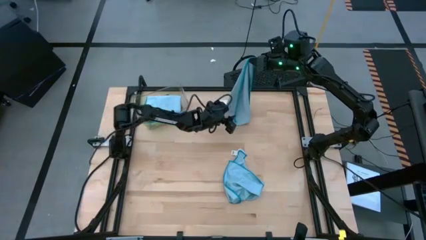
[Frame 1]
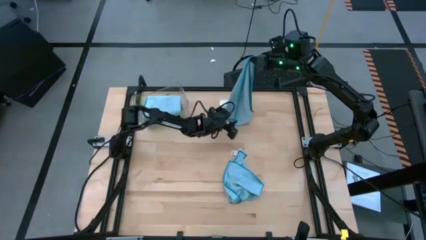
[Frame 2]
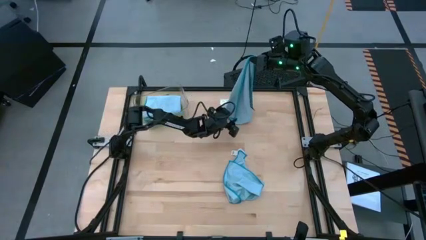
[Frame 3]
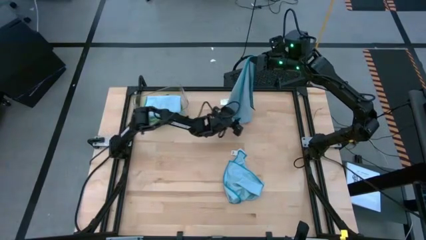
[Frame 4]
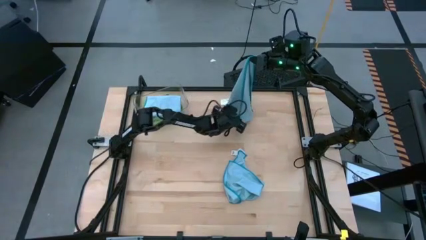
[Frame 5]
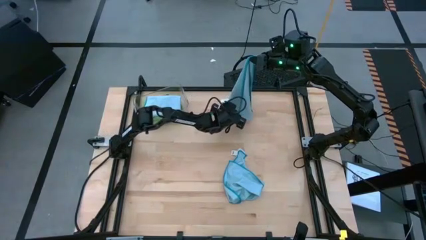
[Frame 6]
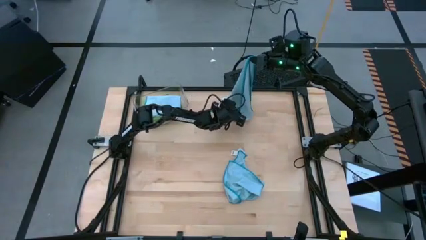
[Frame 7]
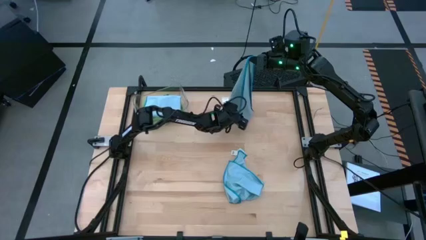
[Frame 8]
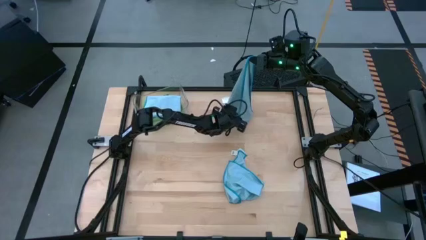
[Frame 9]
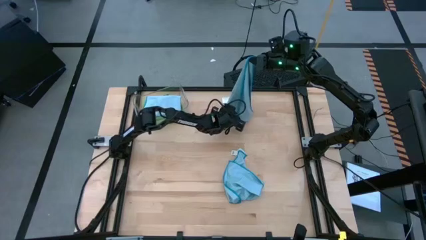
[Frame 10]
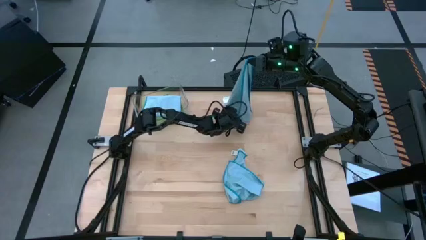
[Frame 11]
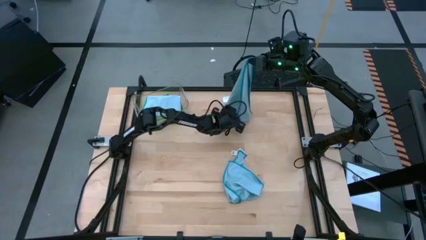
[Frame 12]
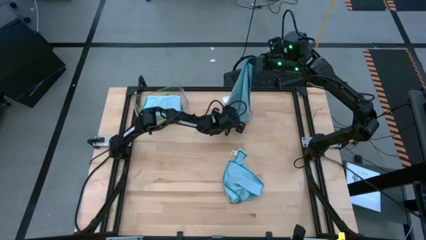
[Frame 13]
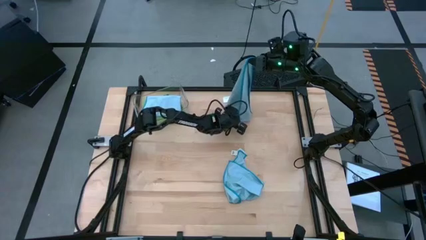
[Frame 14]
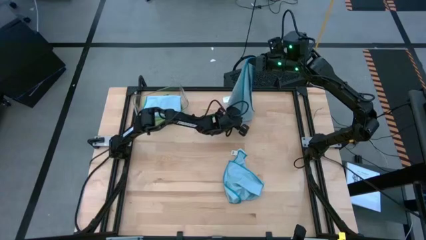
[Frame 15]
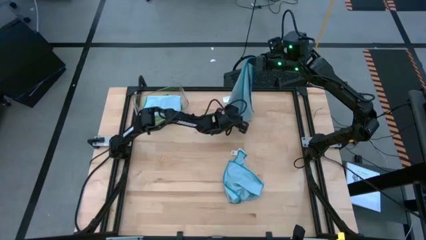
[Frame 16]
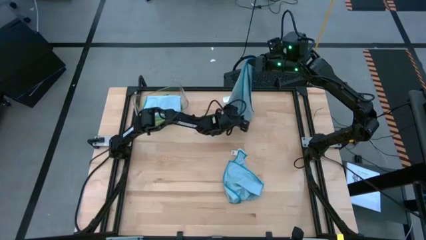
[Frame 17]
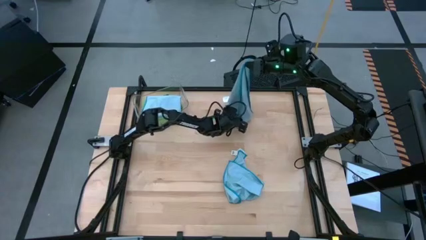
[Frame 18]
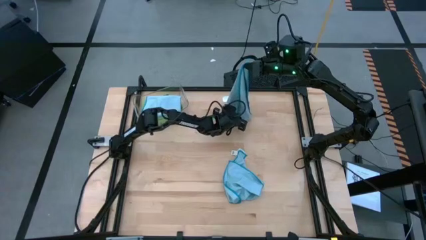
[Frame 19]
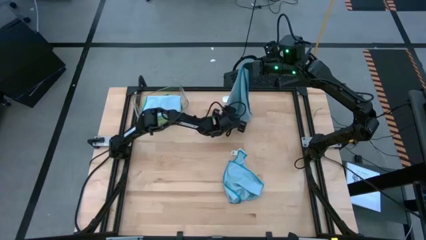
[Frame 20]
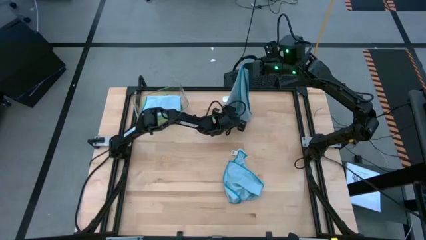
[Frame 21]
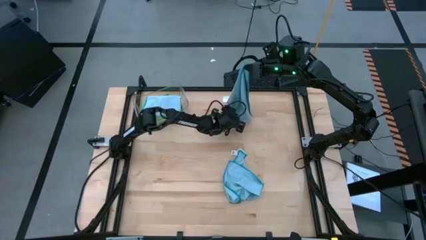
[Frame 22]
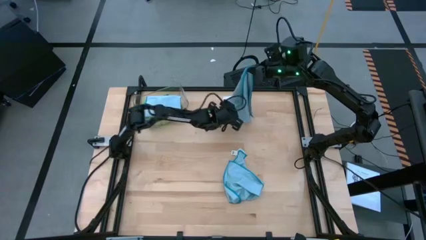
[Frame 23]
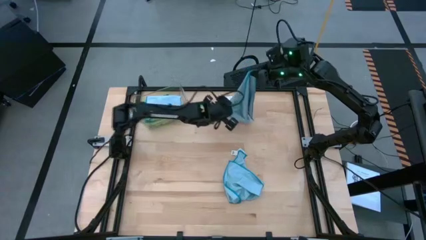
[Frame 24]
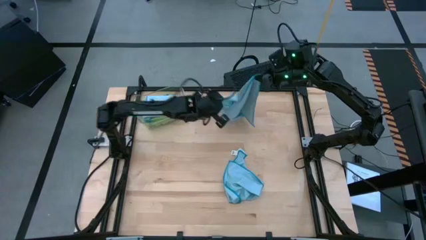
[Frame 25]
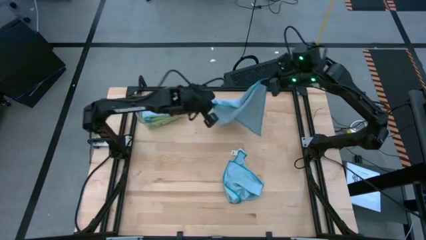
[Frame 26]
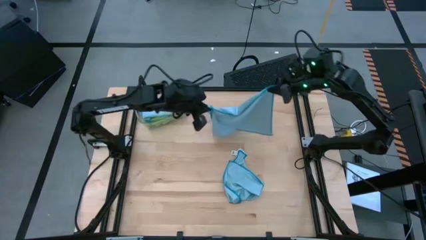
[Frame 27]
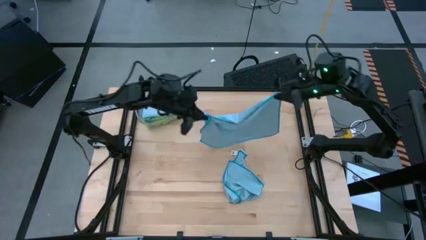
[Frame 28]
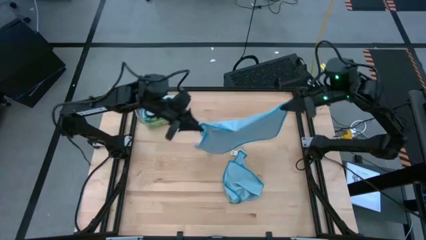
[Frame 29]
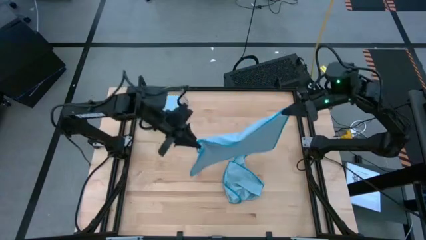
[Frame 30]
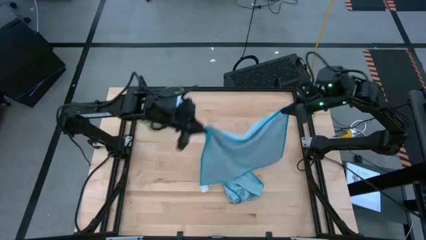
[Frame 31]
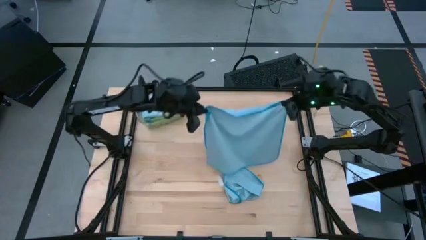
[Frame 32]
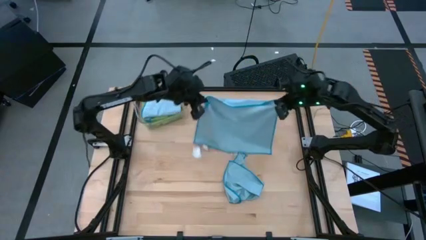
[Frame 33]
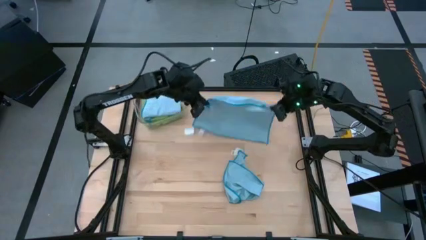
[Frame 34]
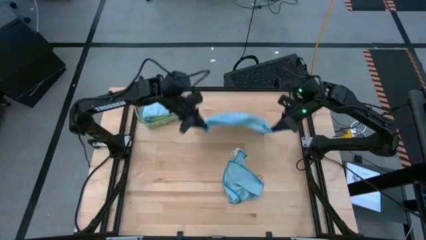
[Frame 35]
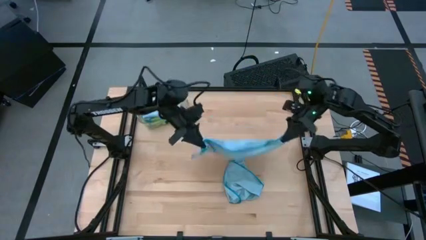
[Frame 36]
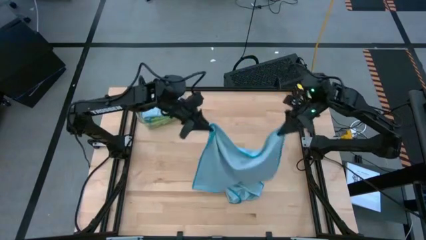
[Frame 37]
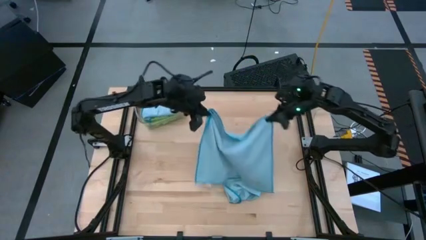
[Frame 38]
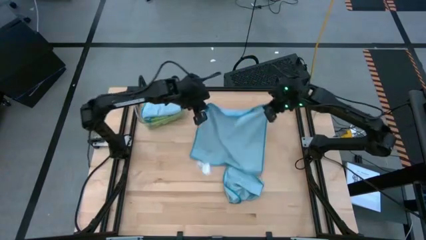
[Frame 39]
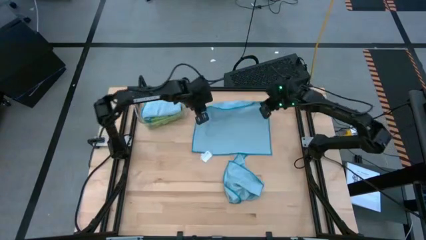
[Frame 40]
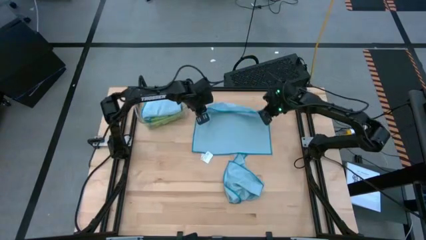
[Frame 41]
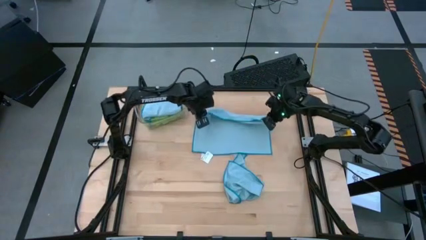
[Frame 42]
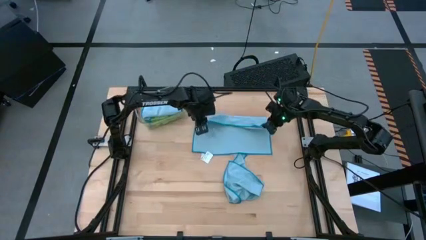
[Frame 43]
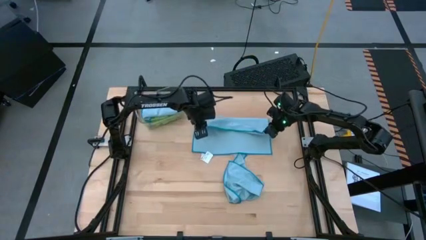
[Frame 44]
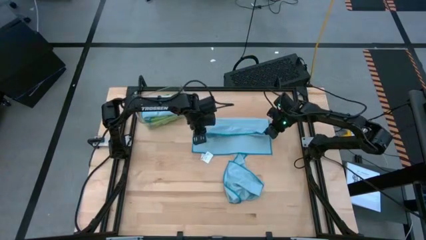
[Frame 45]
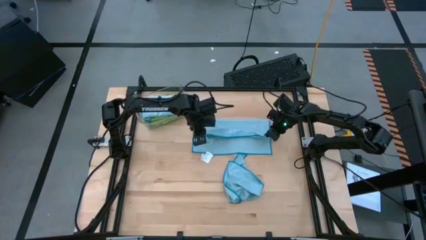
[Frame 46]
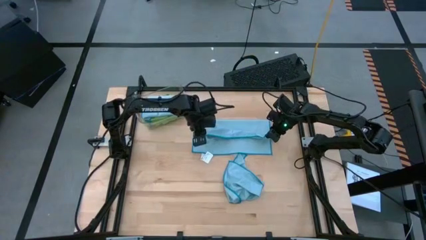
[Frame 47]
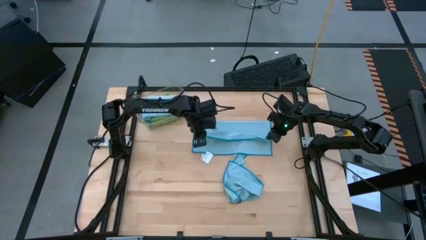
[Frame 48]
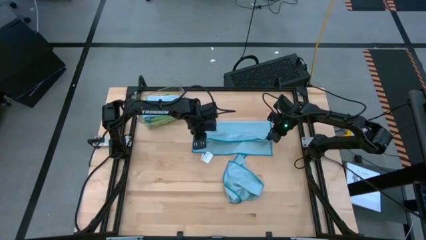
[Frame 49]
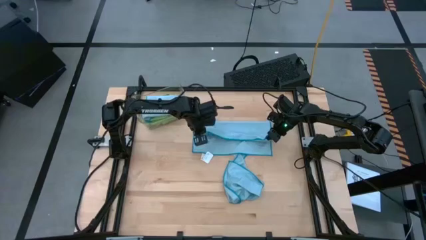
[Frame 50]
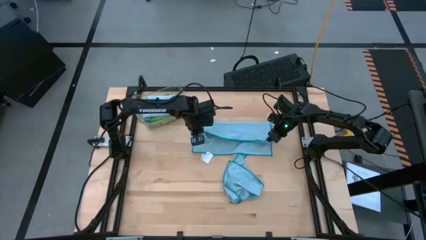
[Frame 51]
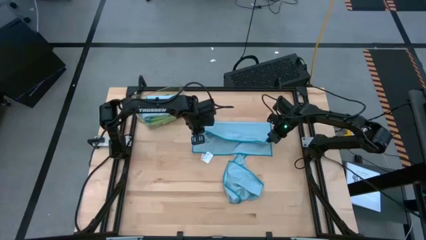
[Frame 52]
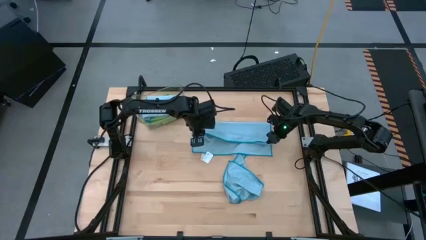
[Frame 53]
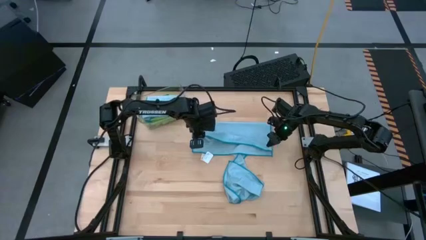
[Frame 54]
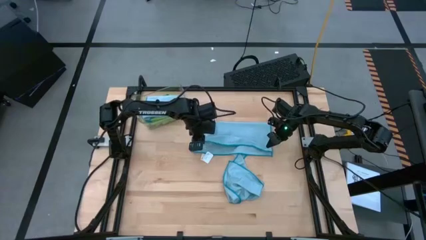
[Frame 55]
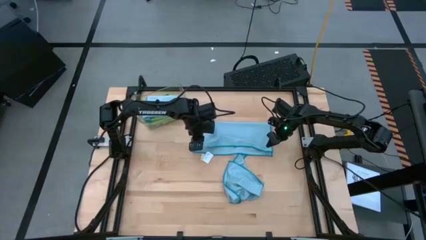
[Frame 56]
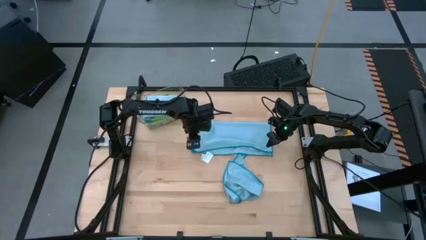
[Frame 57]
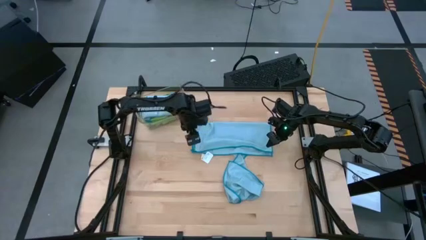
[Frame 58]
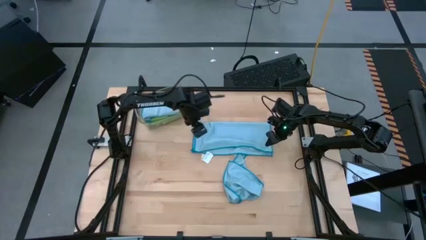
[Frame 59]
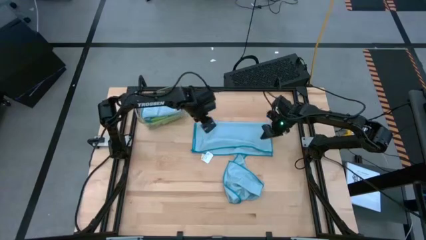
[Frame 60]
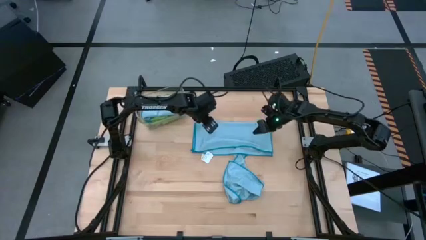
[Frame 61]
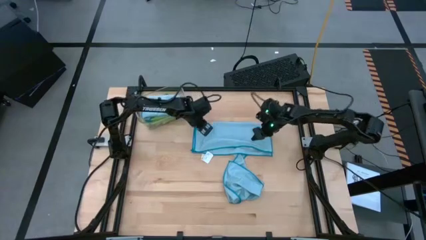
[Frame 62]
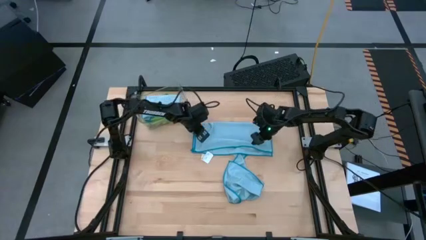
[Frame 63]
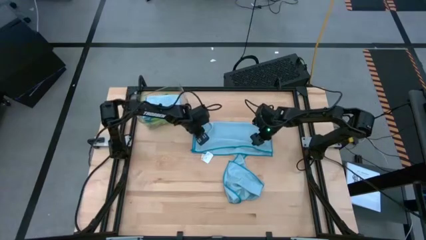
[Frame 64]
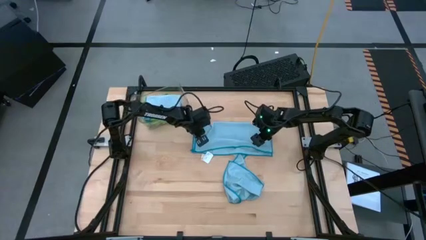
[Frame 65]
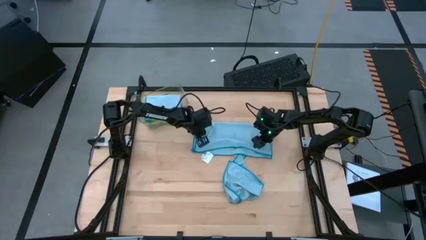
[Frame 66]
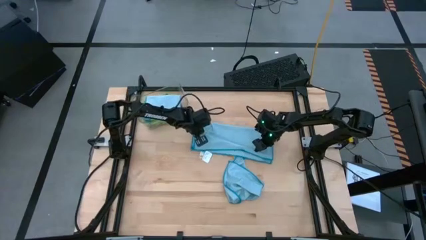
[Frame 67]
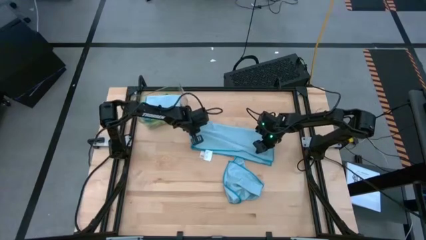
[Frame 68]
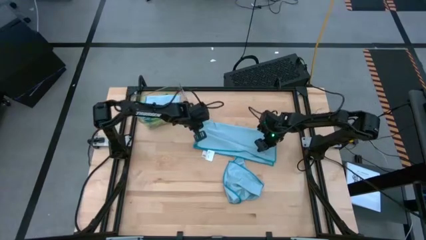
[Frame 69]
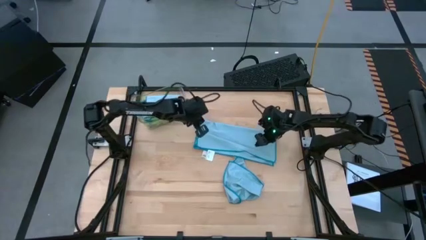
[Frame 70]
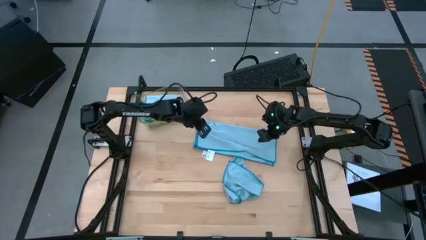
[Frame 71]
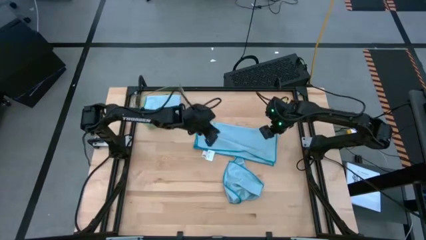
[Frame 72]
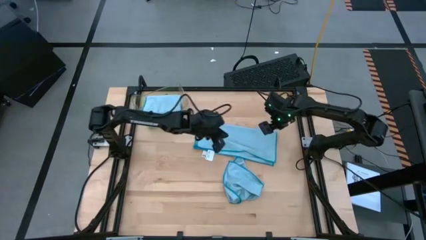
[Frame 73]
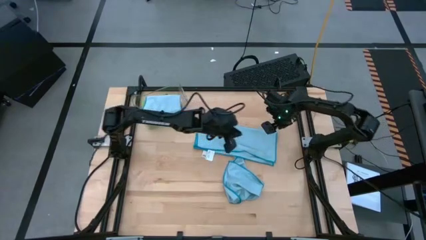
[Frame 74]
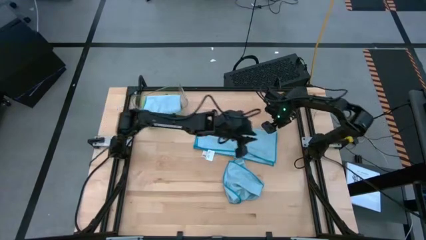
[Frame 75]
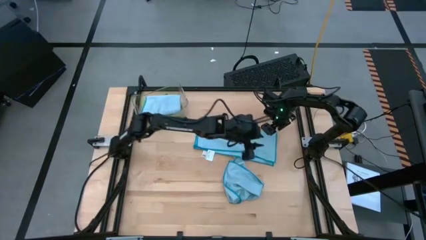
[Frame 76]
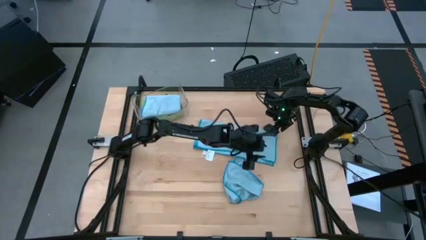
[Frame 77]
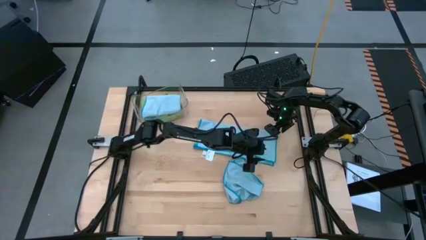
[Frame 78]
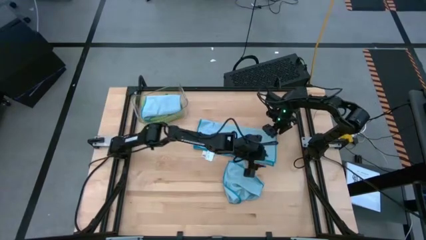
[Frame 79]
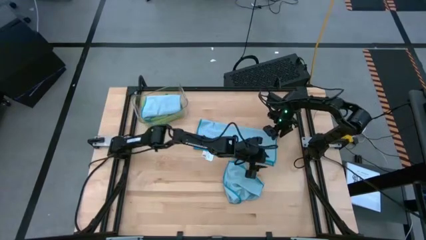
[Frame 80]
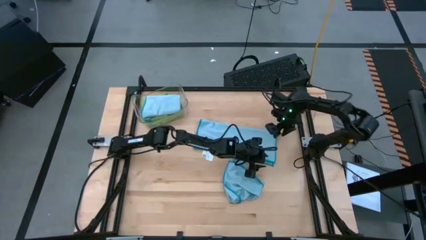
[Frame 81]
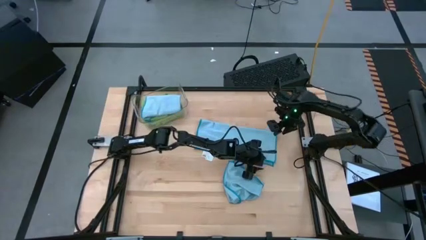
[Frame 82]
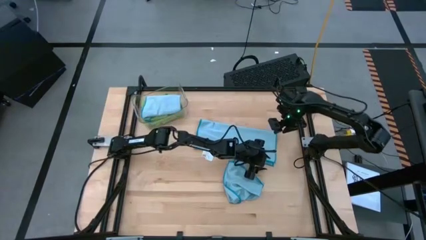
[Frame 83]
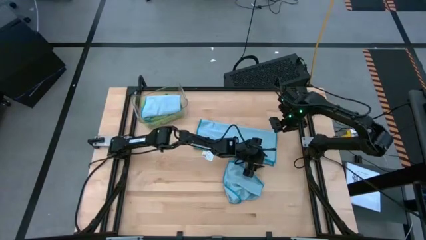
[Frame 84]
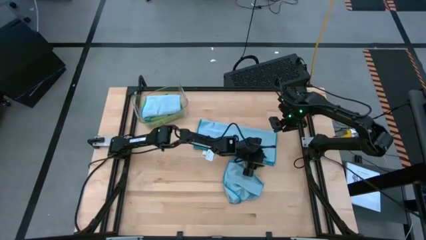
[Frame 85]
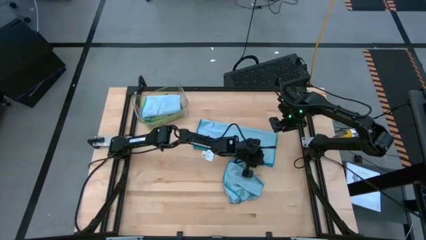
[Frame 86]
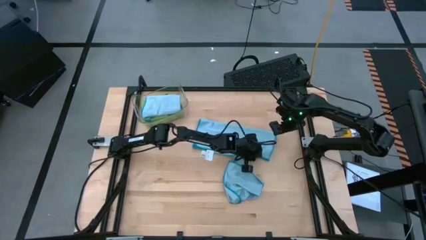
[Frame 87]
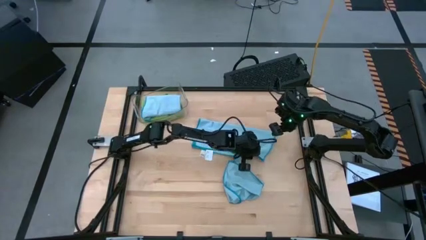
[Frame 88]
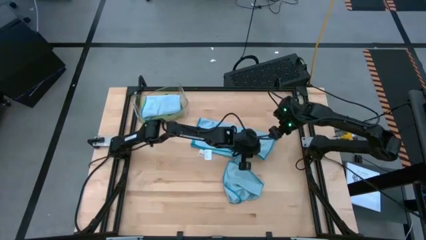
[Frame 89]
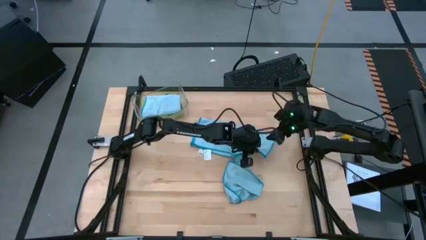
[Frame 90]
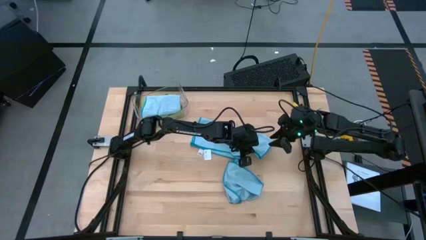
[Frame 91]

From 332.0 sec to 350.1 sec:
Task: Fold microfiber towels
Fold the left blue microfiber cloth
